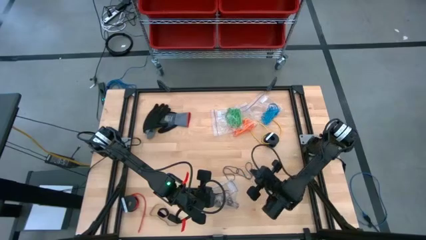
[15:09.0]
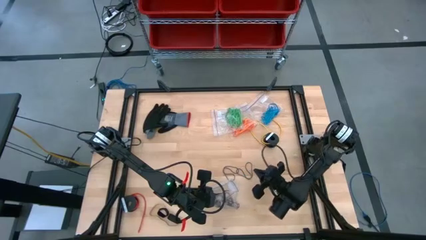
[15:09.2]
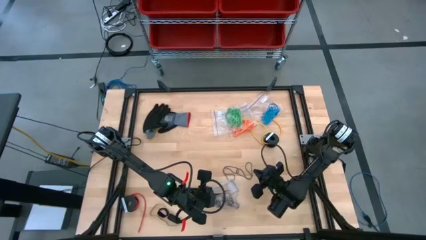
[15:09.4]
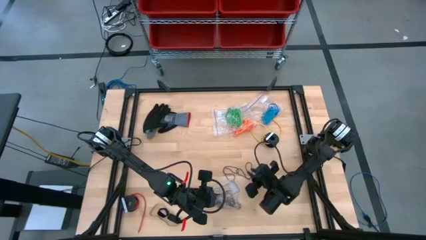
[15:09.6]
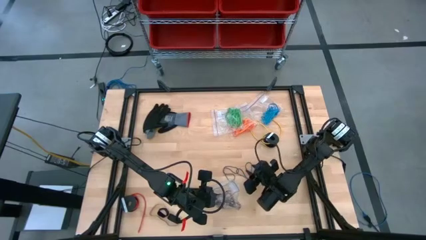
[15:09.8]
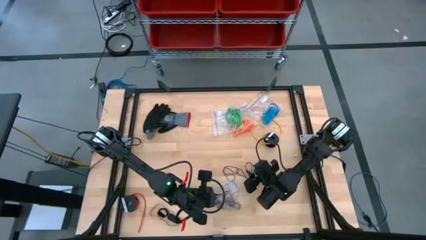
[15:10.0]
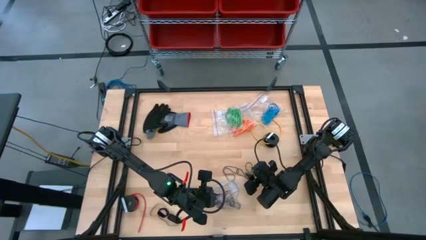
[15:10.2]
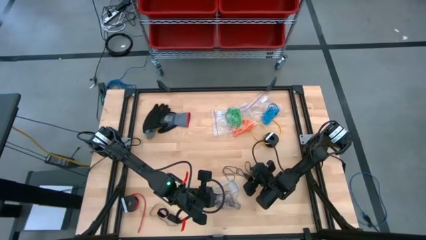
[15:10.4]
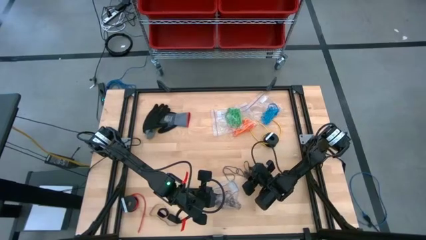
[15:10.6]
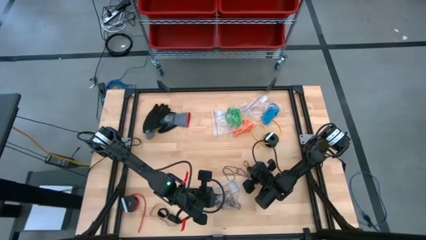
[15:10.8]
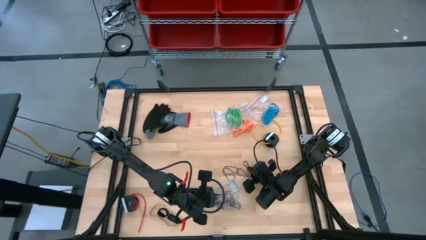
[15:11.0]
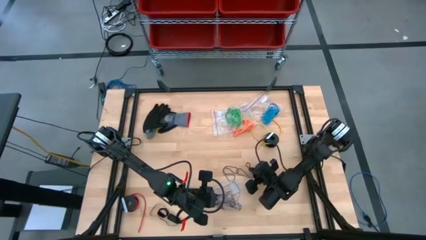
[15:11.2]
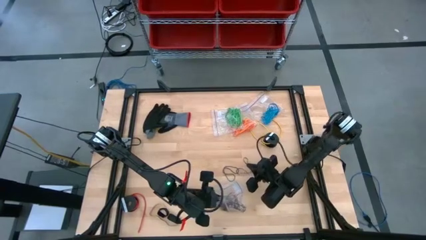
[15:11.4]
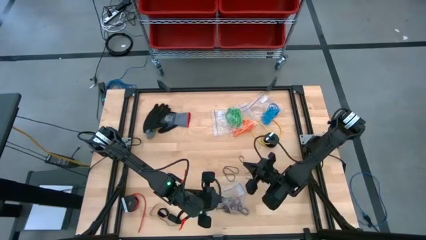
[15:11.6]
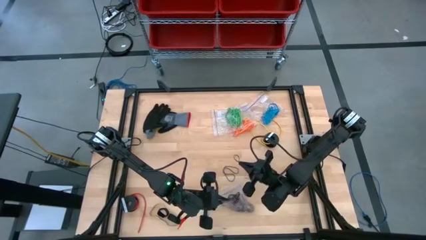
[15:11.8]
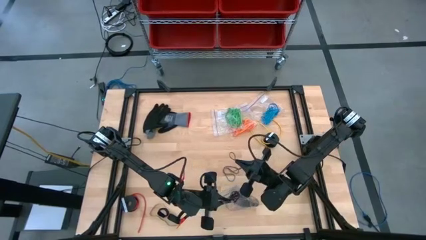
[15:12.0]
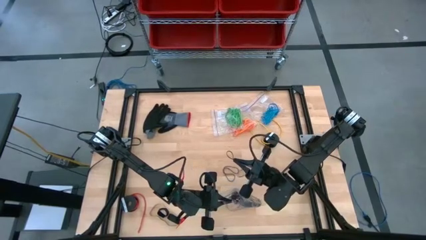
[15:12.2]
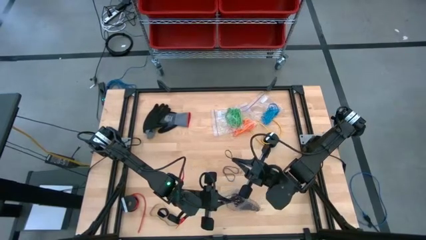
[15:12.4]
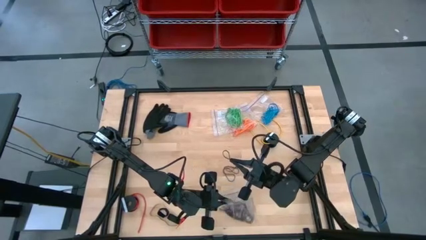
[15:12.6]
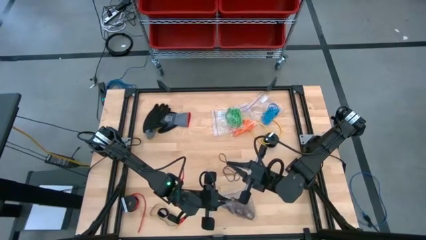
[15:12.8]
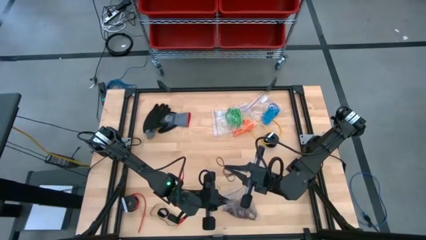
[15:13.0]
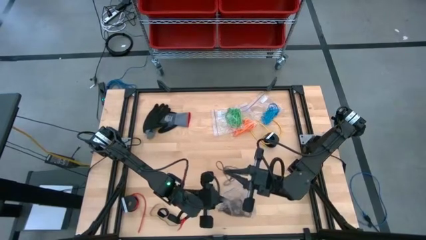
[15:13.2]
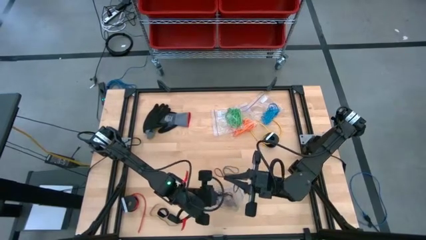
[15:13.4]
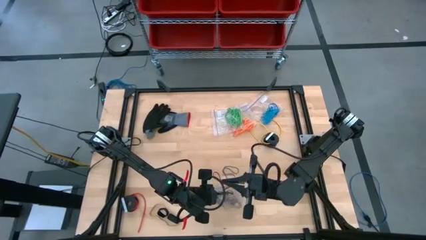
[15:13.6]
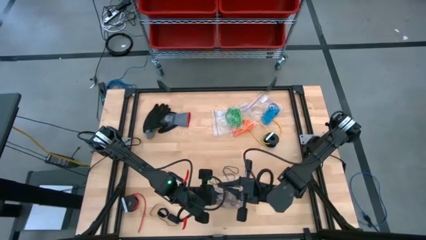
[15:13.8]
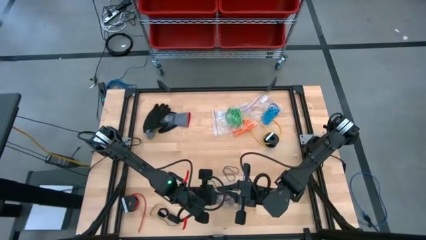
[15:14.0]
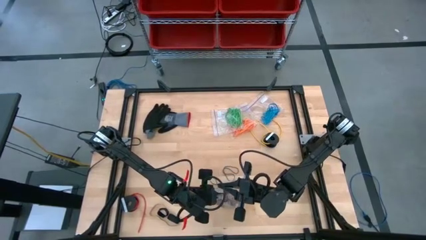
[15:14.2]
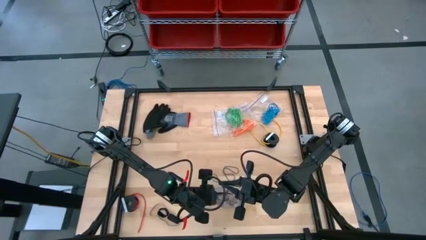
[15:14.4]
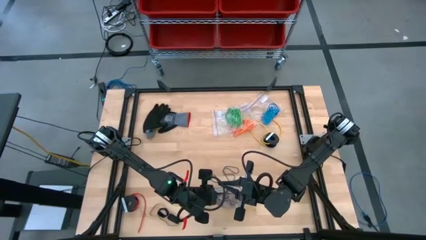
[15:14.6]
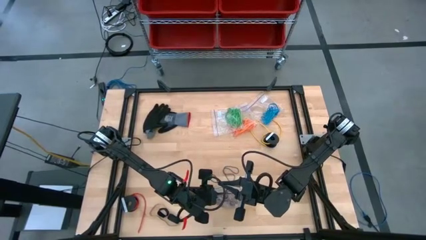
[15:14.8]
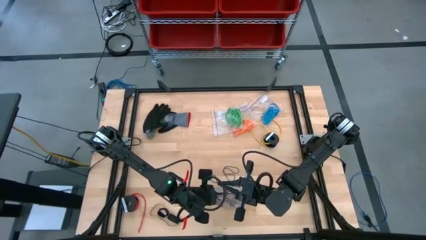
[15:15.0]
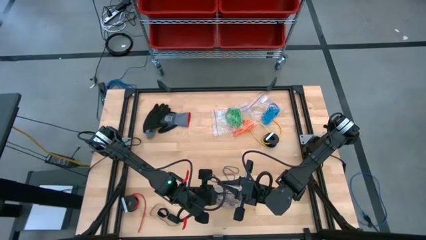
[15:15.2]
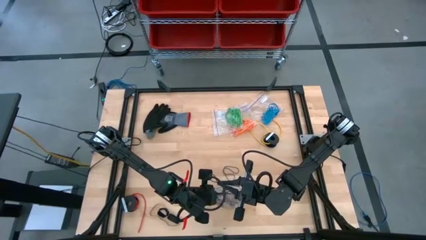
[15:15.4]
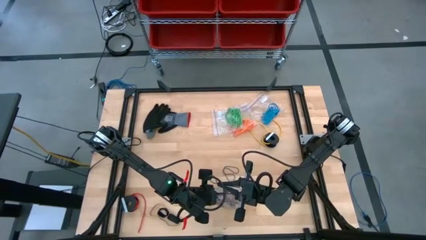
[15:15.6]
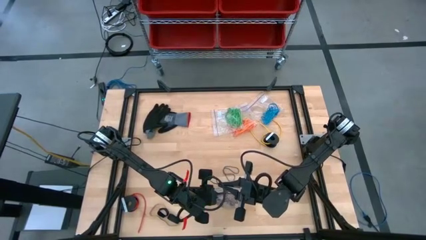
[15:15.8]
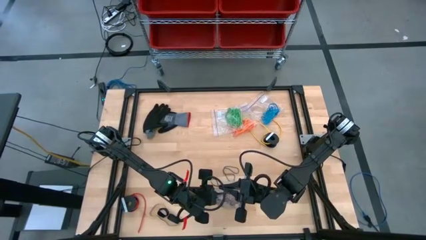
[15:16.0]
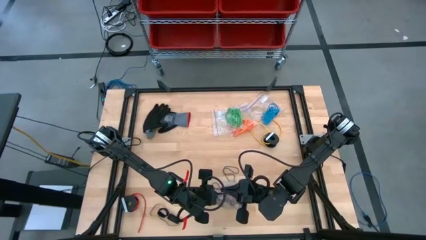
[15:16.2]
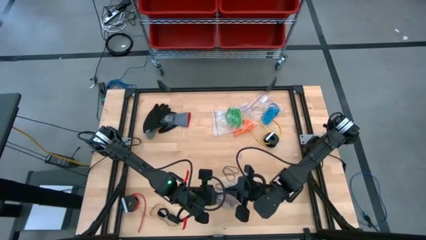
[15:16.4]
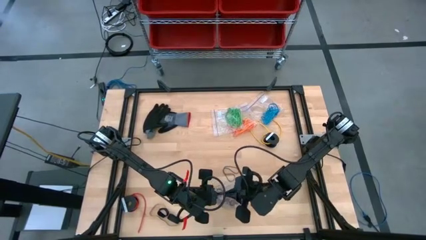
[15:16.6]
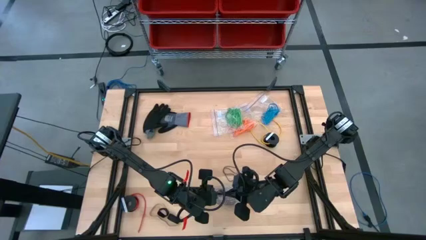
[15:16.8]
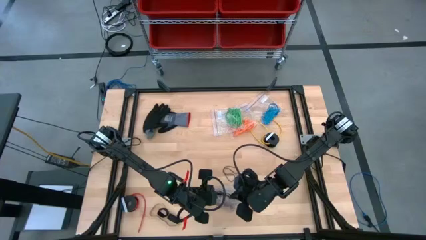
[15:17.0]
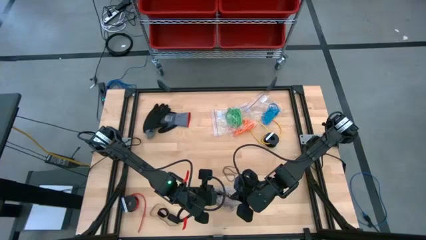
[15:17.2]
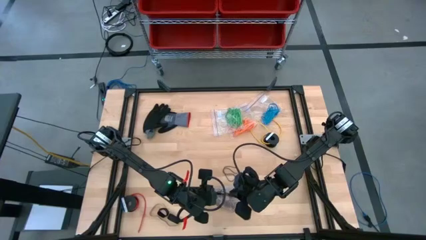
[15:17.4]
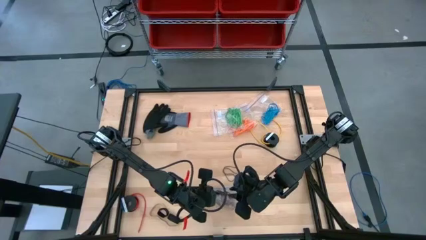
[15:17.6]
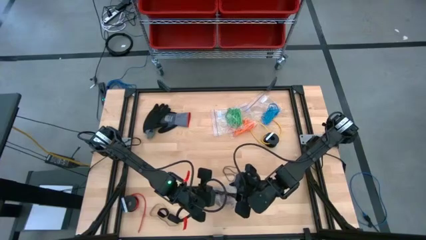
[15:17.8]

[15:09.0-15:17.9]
Task: Sort rubber bands
Put the black rubber band into the transparent zip bag

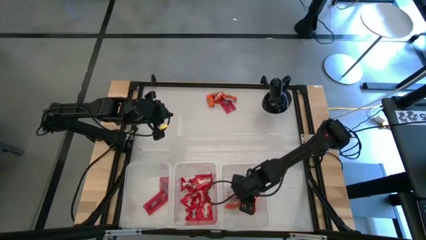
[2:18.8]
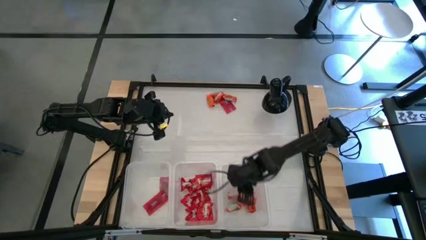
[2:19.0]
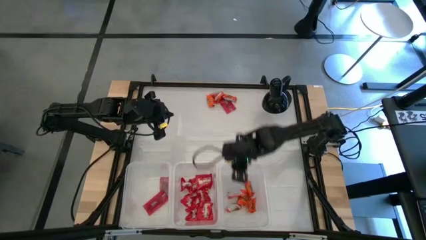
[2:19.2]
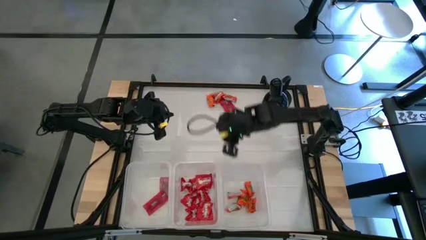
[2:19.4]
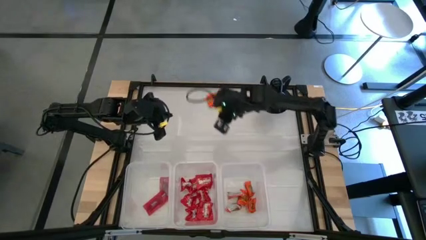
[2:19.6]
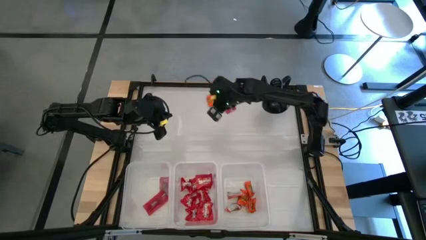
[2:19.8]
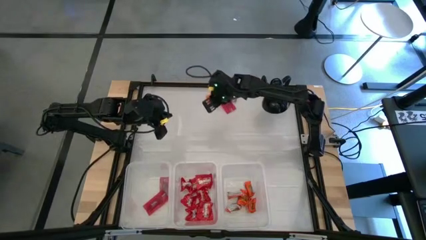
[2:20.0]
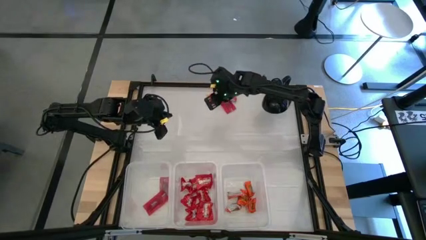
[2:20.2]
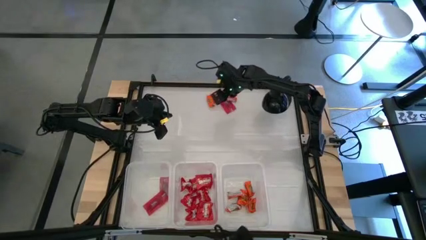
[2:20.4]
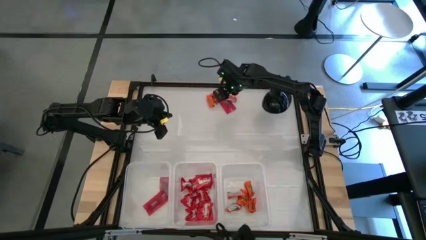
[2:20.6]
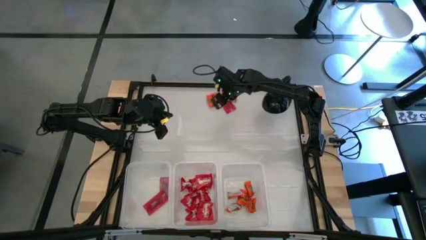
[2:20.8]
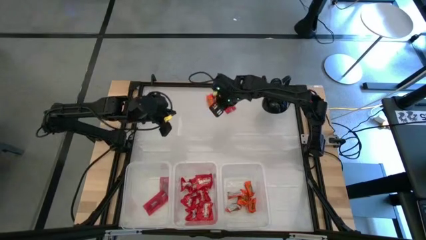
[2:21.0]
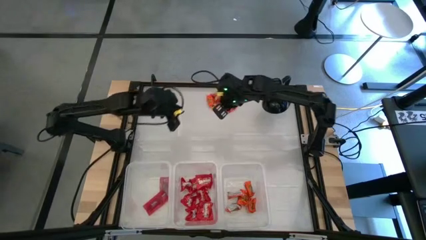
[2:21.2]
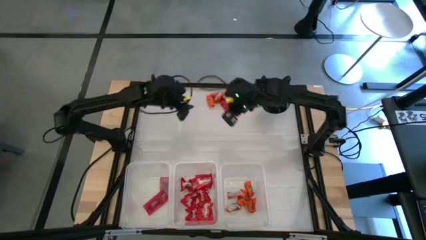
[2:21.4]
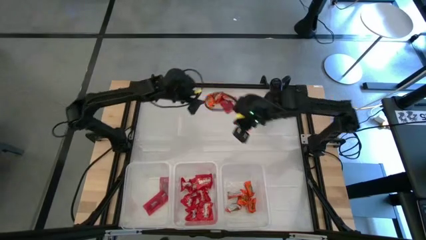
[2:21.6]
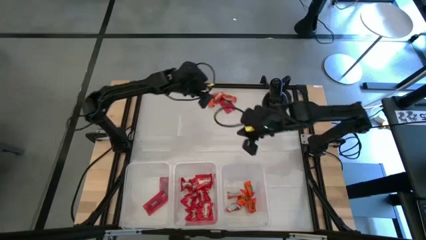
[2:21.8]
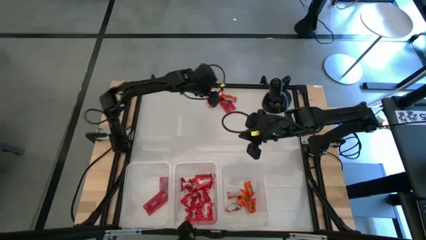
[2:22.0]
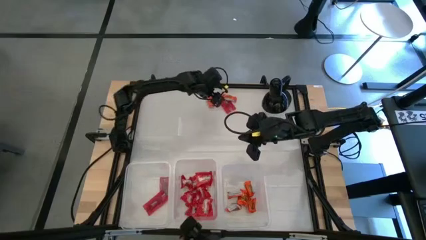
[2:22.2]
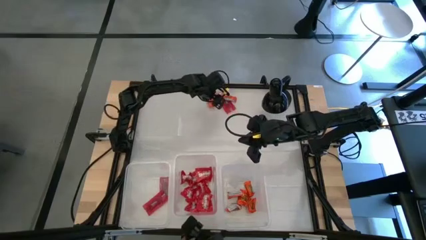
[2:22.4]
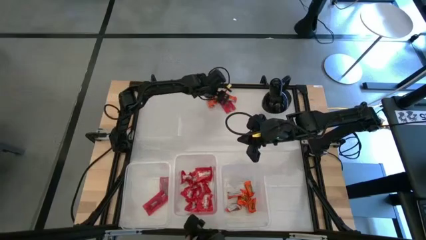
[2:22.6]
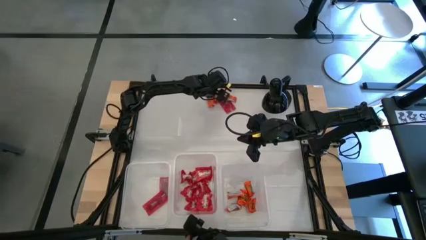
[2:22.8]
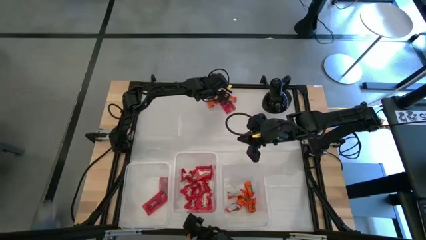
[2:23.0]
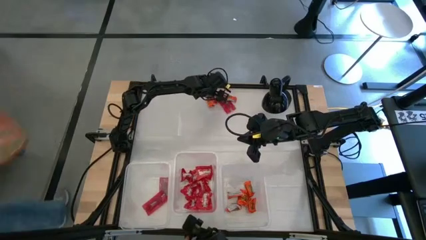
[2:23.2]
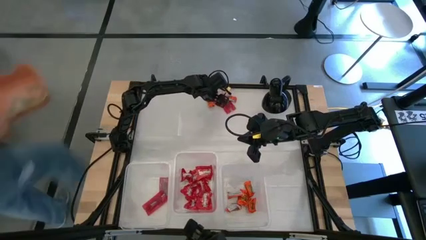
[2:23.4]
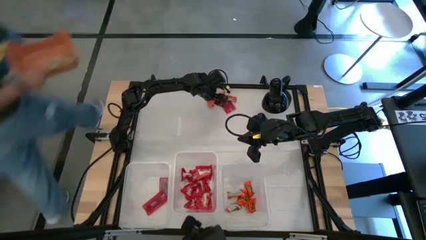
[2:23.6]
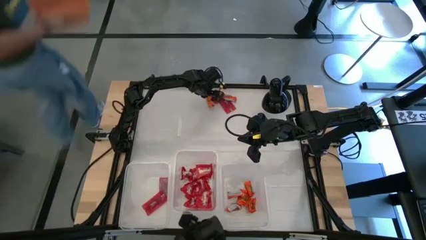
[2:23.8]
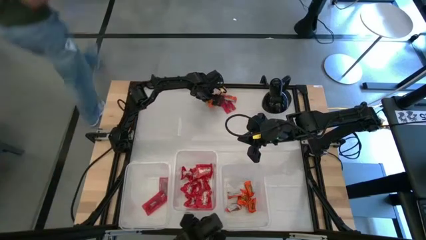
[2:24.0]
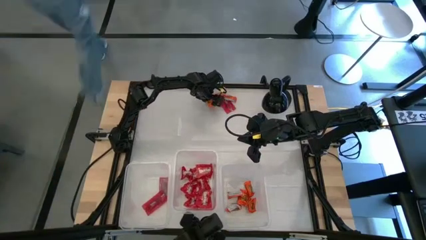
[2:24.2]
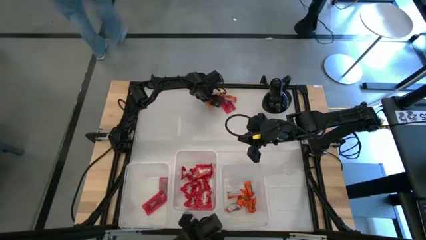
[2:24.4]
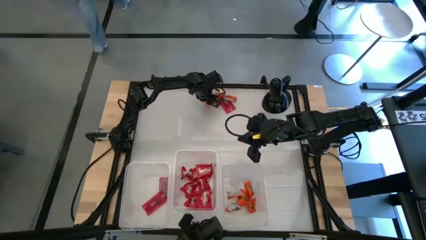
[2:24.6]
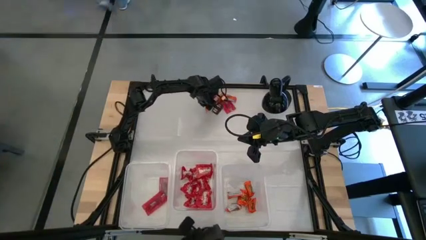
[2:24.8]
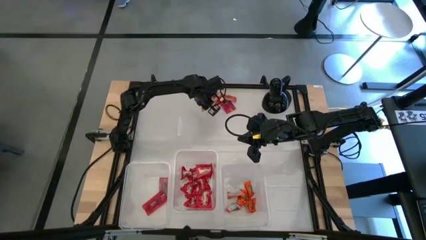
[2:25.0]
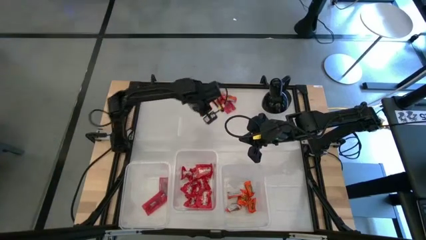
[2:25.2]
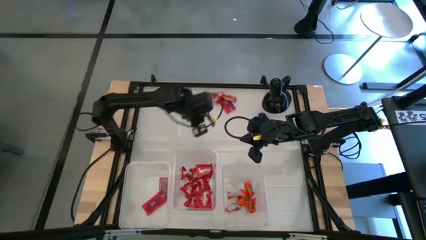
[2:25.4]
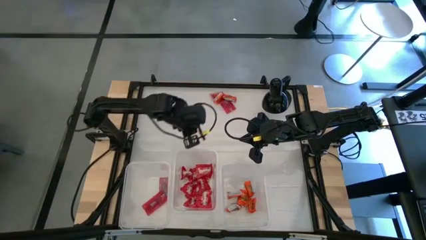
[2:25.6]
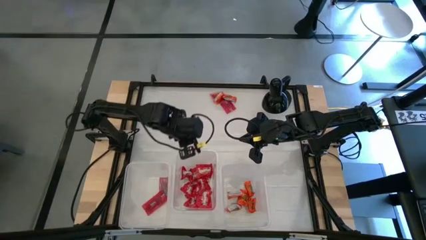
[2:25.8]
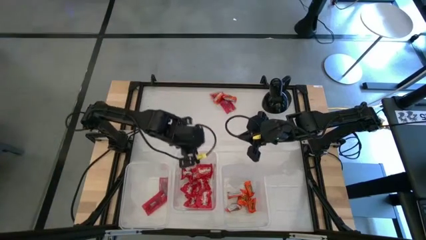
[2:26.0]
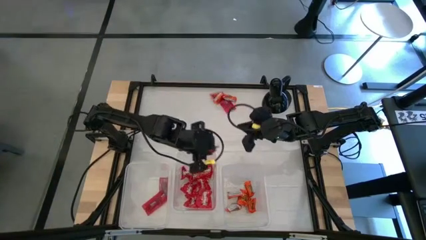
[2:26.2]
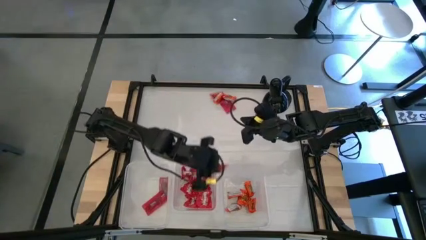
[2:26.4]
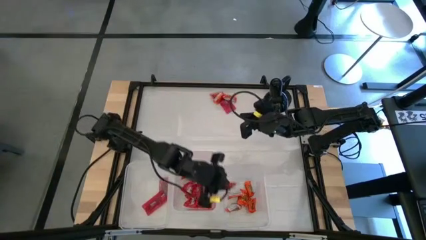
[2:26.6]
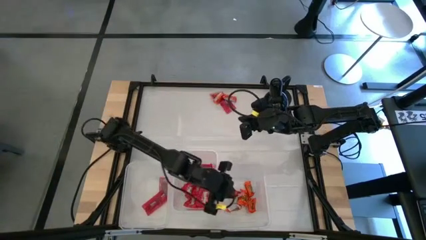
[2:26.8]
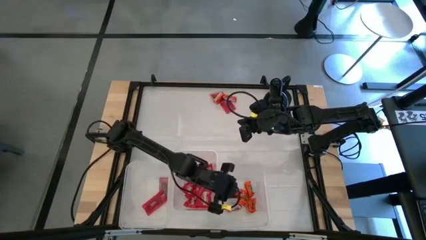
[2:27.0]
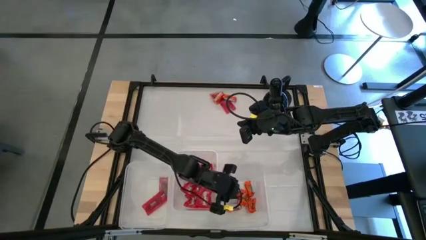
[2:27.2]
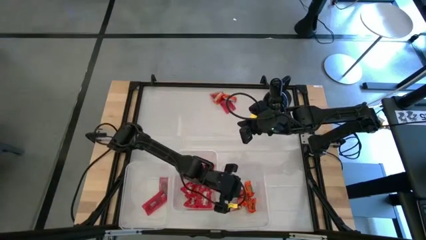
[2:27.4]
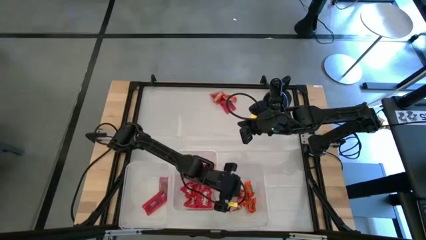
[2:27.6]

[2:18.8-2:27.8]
Task: Sort candy
Put the orange candy into the right transparent bin
